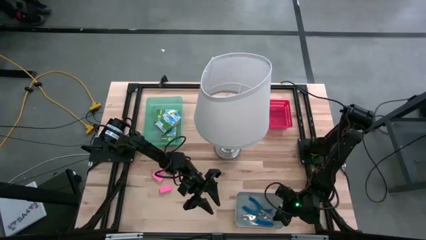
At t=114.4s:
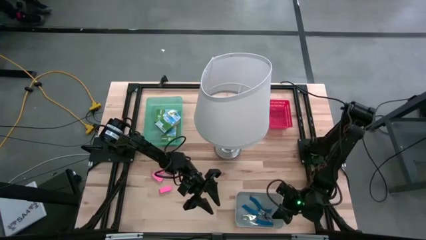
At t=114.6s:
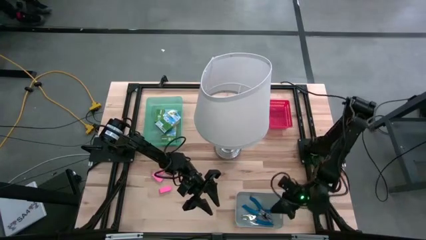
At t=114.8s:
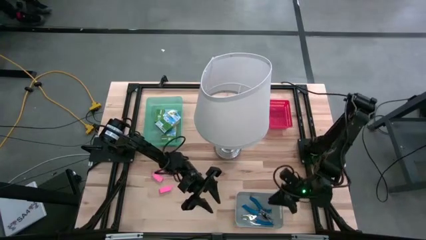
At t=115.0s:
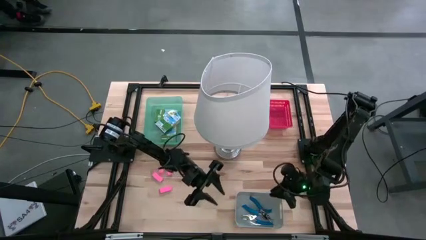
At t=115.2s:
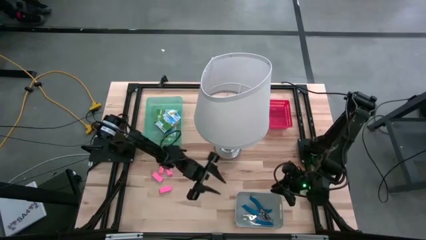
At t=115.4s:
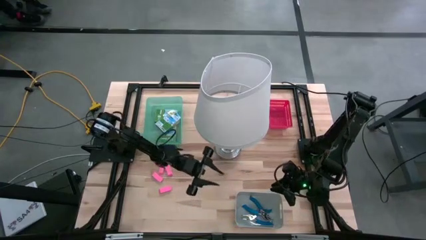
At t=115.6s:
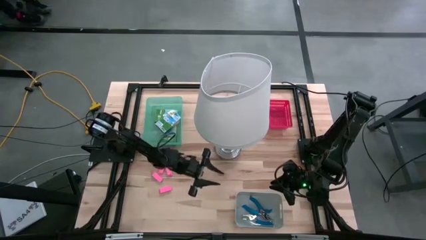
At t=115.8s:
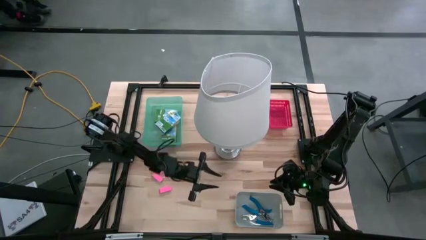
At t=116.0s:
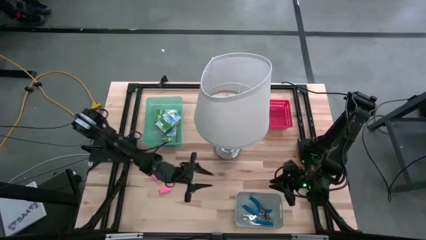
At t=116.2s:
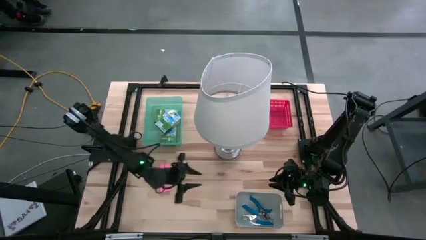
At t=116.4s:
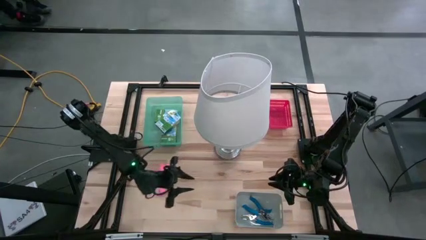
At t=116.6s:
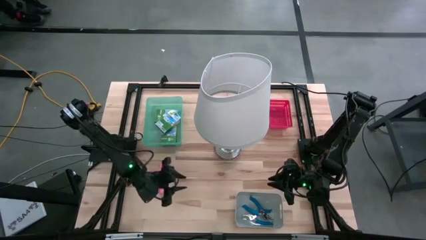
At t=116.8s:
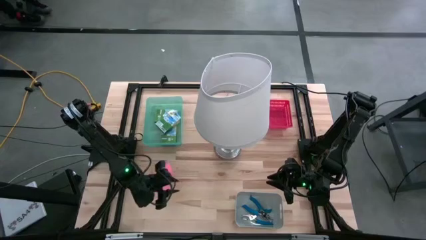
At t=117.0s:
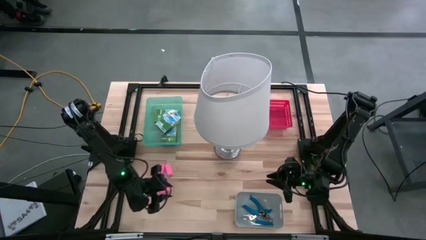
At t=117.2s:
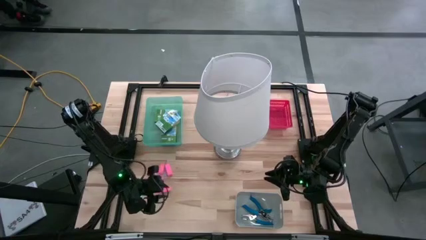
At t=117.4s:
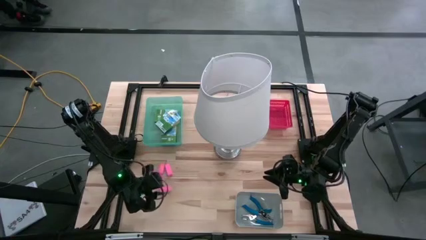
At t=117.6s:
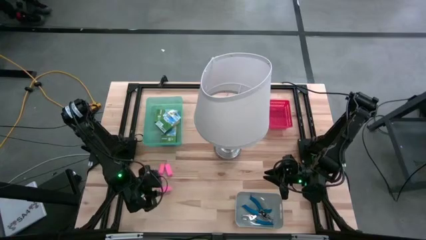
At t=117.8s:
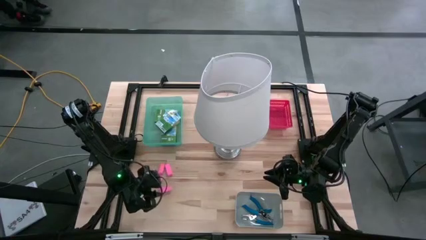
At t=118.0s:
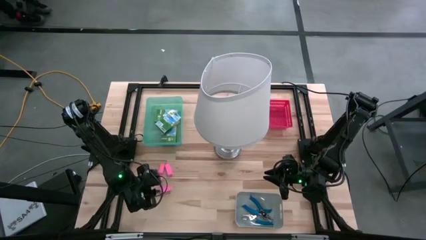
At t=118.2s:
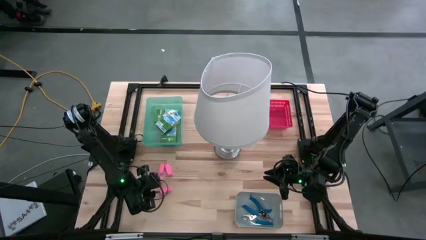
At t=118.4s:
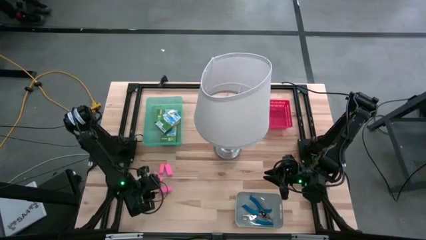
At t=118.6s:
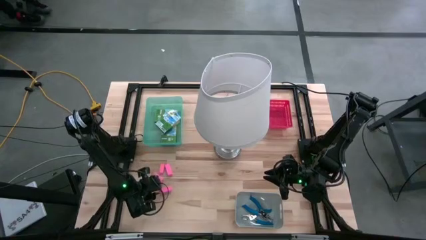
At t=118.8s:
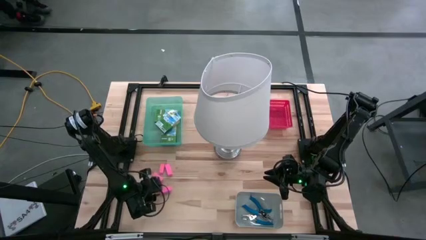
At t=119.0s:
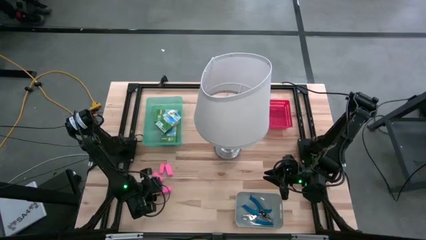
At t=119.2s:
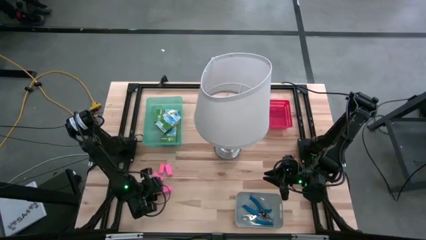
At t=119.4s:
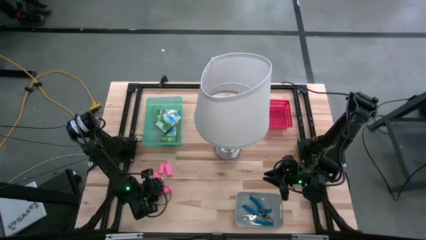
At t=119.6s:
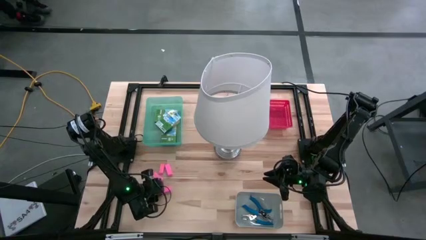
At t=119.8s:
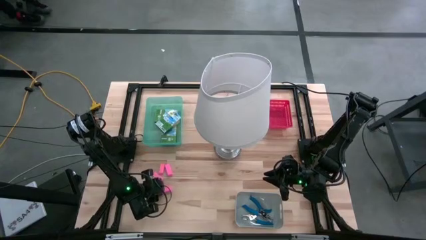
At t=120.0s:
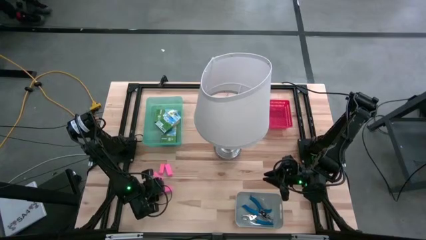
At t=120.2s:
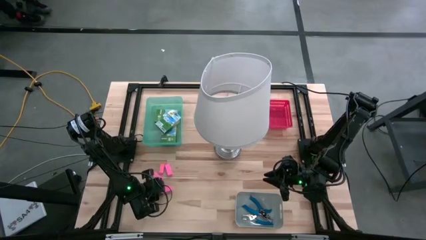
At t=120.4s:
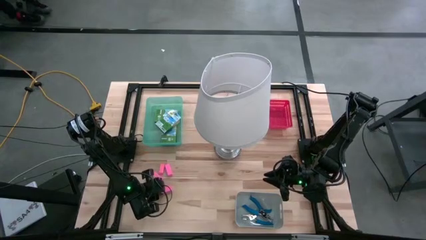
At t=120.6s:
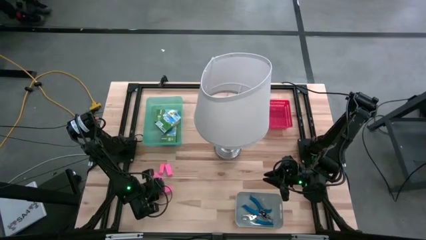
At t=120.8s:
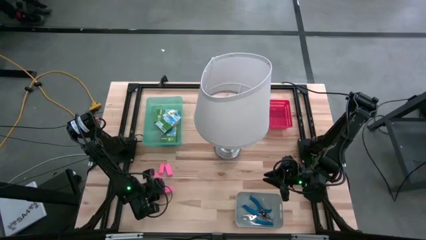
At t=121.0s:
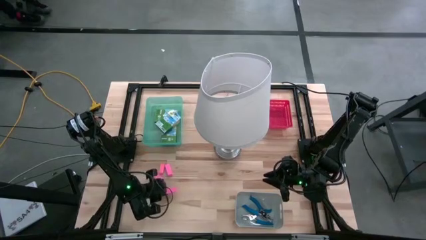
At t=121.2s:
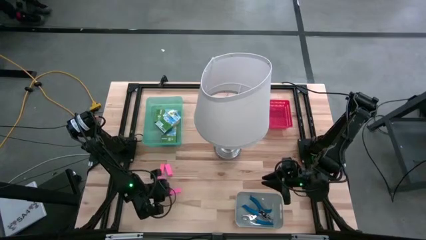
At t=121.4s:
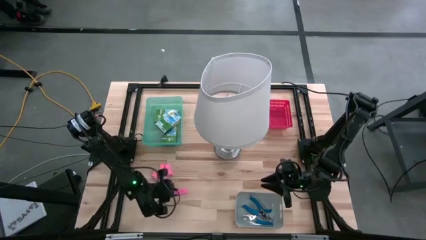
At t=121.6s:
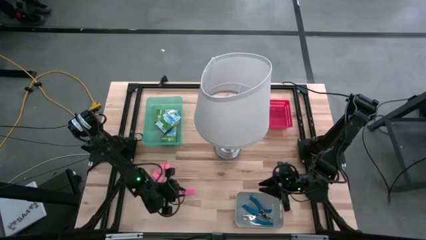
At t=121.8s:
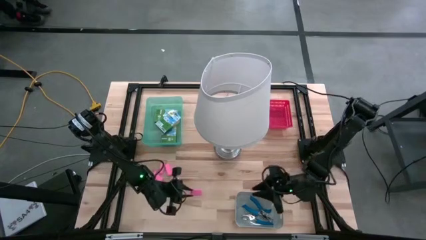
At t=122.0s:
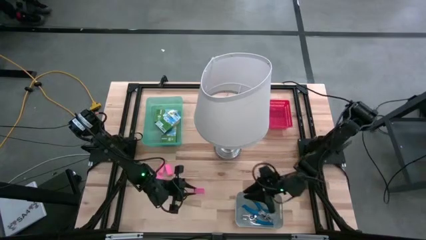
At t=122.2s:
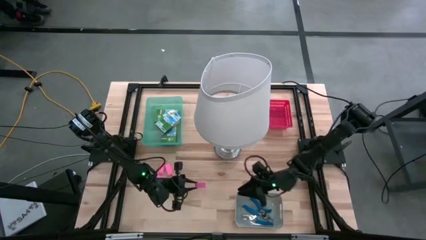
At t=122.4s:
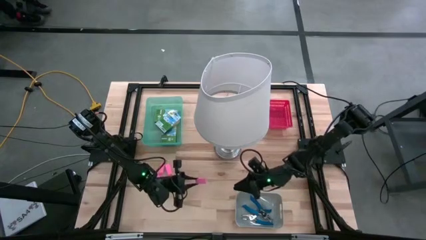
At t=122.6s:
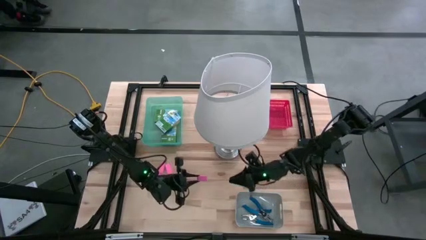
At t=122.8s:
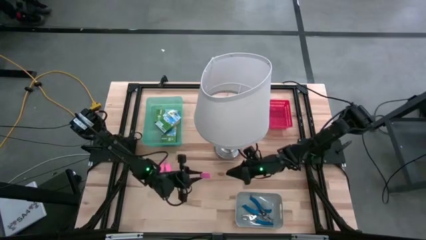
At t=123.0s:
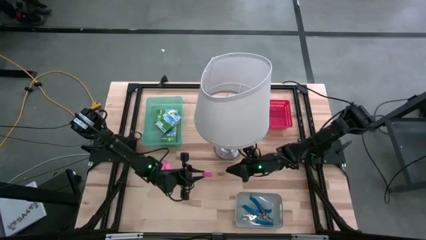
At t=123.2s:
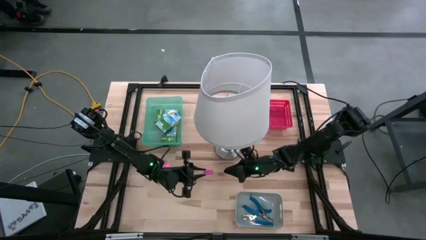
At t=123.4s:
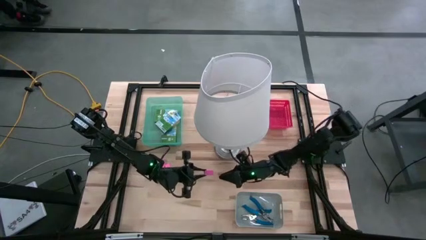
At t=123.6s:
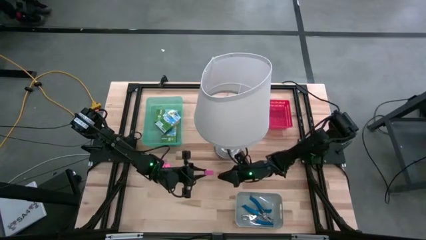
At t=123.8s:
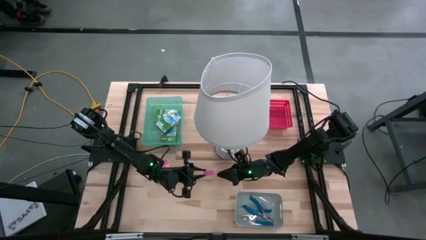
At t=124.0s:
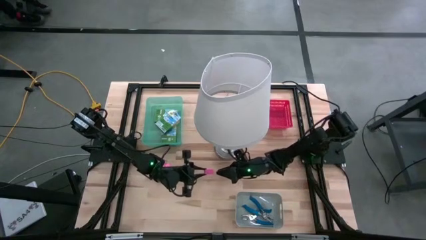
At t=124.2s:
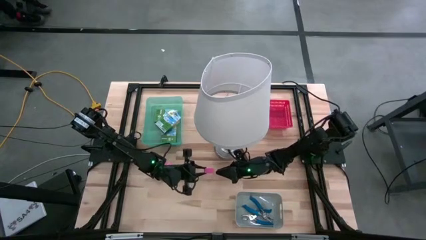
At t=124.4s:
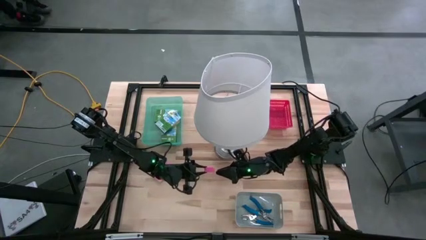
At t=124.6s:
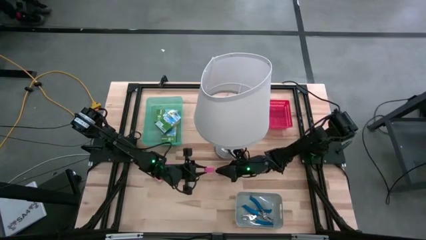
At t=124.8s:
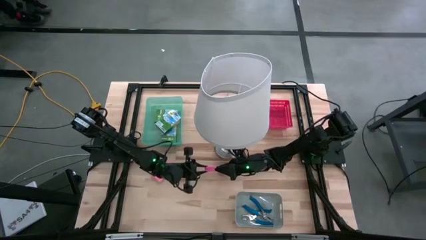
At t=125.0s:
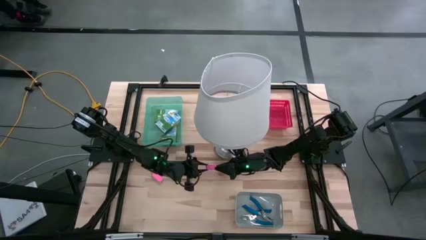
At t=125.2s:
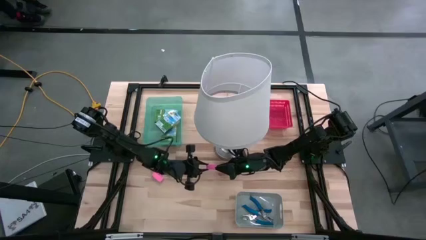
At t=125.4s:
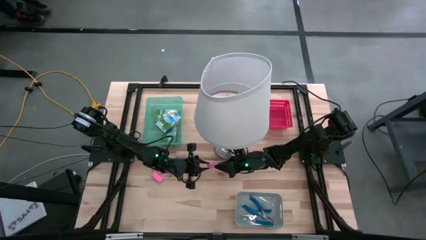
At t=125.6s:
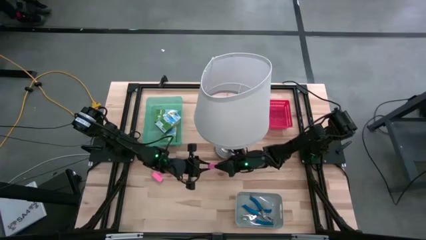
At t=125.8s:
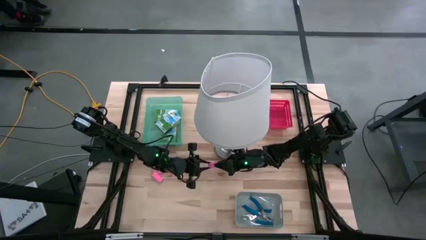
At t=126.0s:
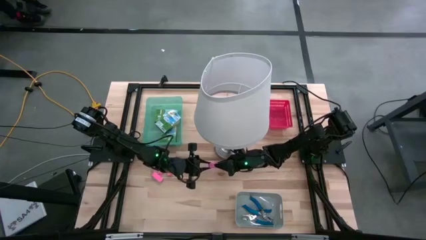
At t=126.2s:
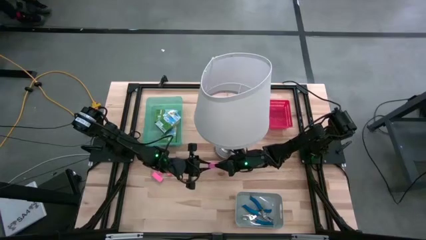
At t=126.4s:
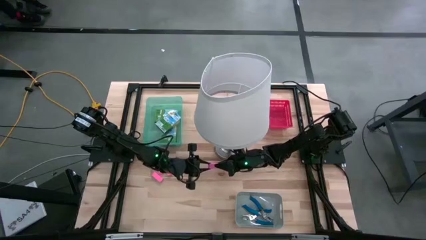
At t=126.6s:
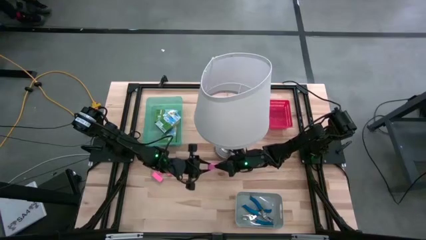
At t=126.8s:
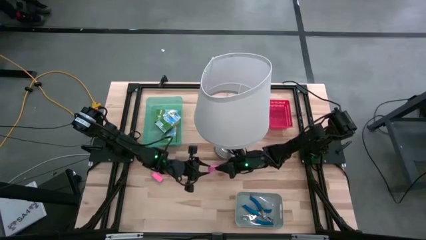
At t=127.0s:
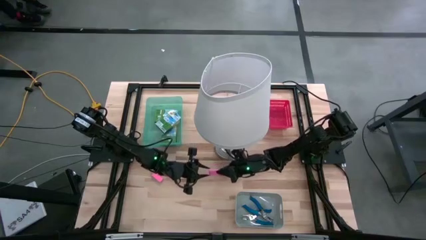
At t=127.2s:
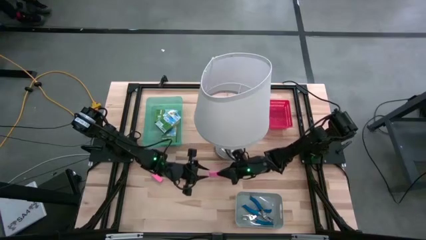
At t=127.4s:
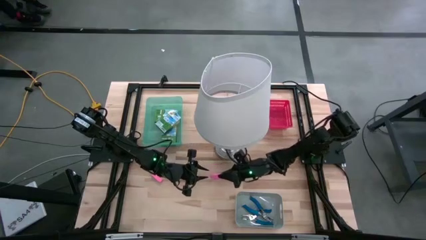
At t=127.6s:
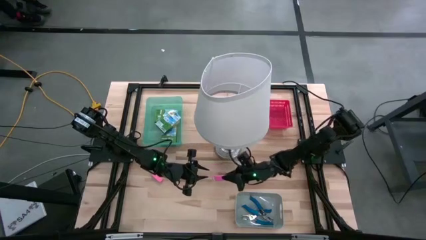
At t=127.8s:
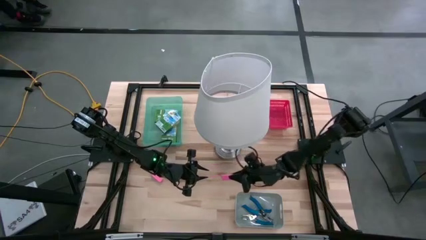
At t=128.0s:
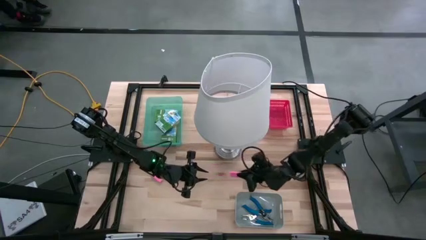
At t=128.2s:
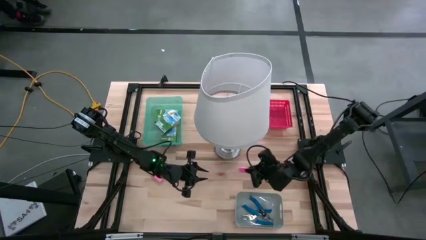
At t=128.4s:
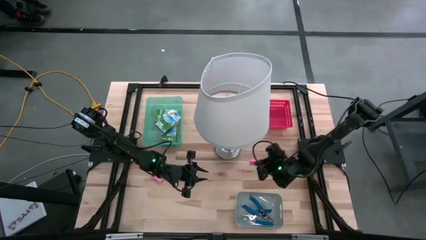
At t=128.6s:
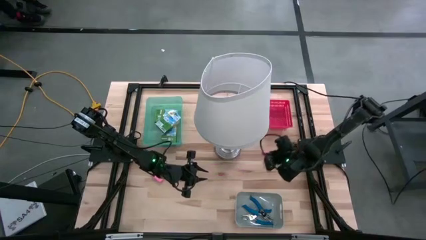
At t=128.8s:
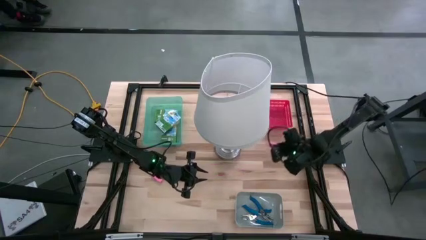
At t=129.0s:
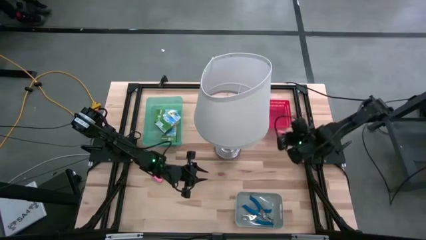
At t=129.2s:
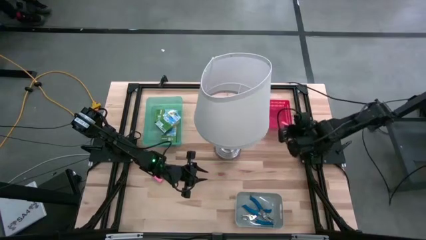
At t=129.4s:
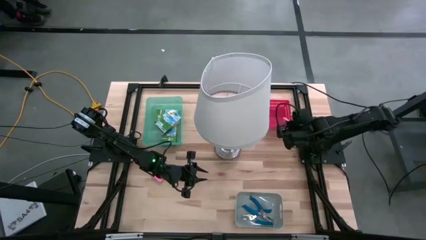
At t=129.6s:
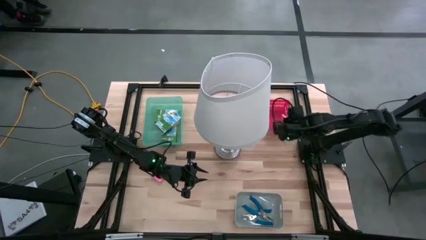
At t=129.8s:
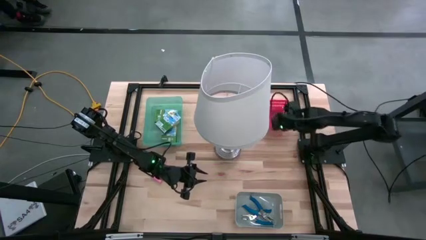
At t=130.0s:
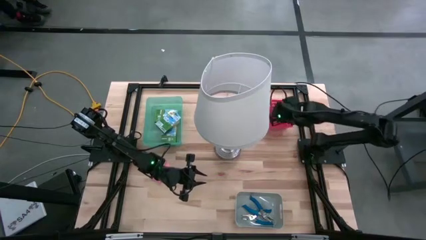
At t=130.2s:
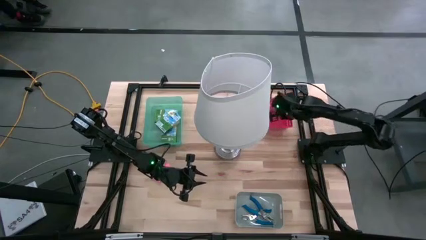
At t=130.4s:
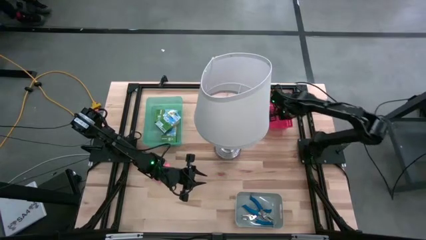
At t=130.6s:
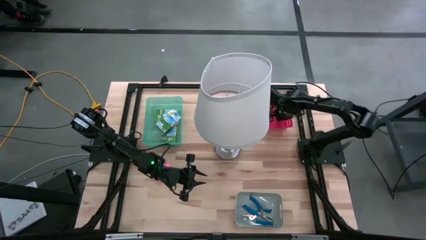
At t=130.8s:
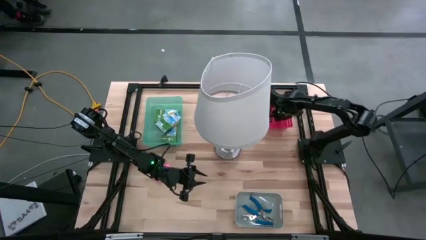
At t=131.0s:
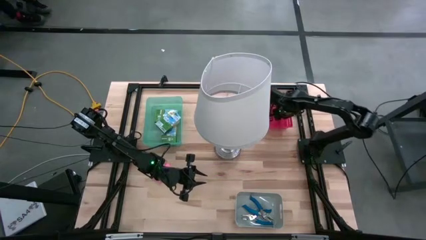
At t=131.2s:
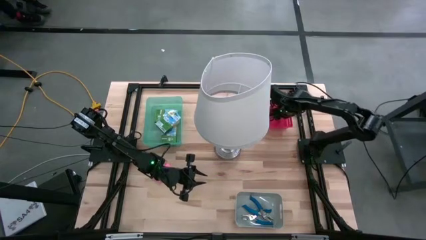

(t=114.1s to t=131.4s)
Task: Pick & Place School Supplies
Put the pink eraser into the red bin
